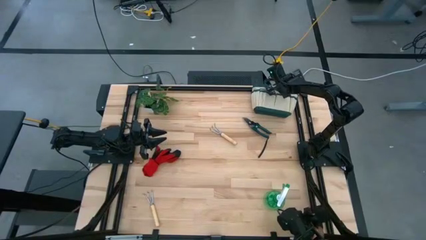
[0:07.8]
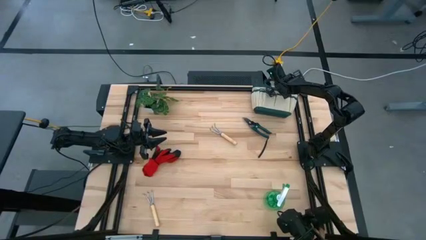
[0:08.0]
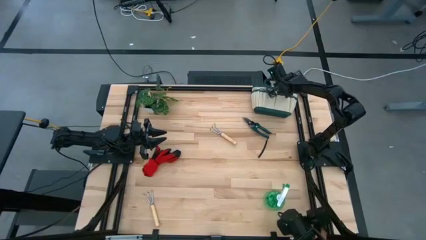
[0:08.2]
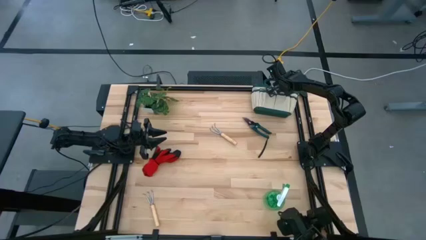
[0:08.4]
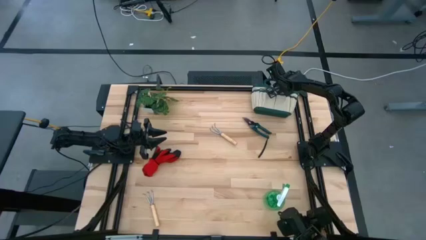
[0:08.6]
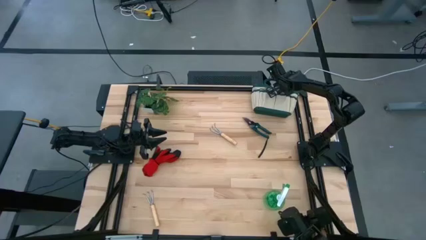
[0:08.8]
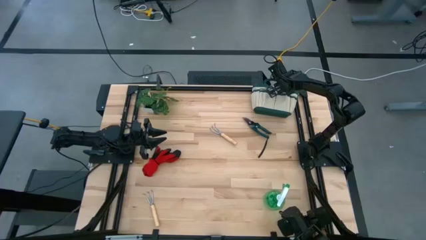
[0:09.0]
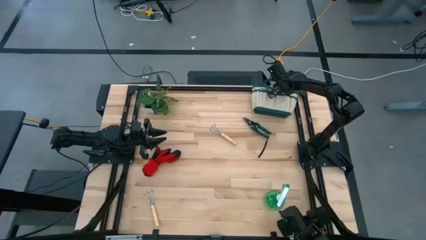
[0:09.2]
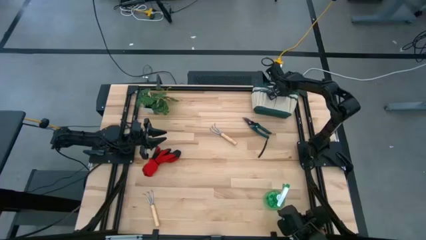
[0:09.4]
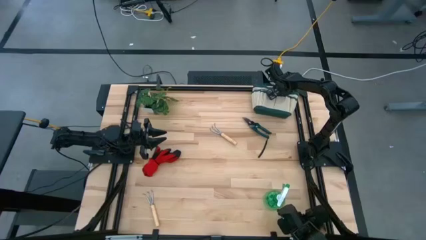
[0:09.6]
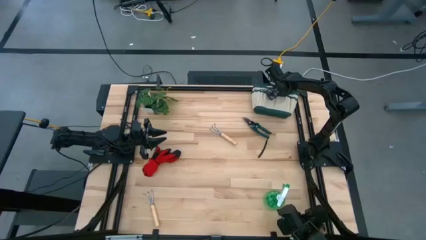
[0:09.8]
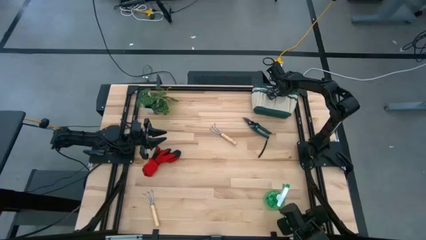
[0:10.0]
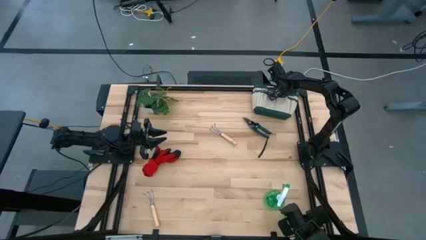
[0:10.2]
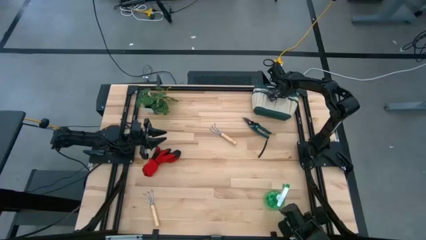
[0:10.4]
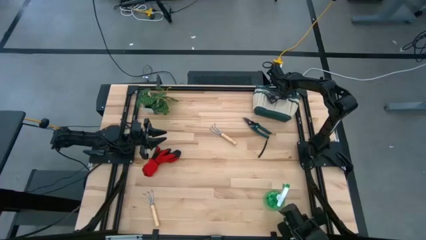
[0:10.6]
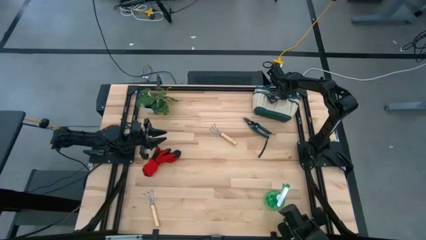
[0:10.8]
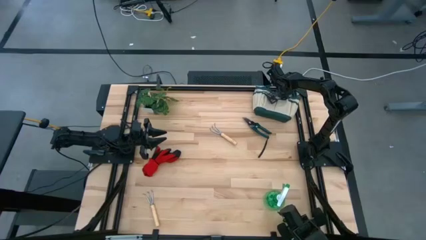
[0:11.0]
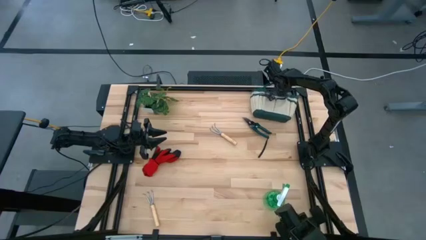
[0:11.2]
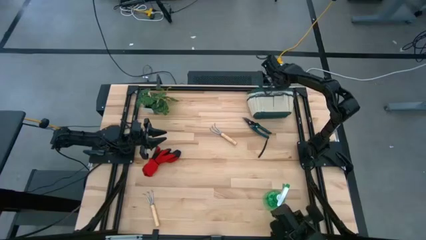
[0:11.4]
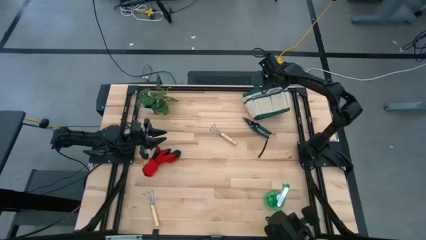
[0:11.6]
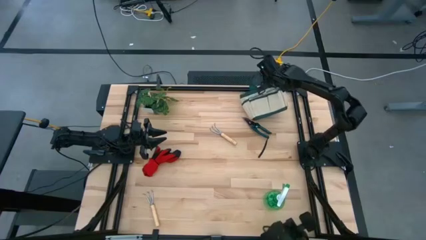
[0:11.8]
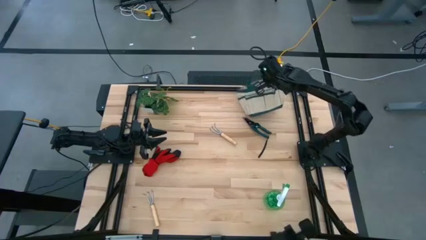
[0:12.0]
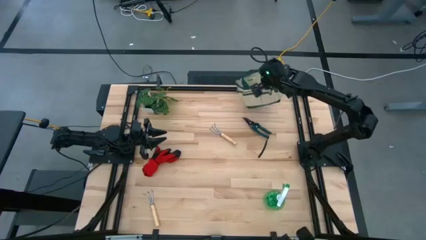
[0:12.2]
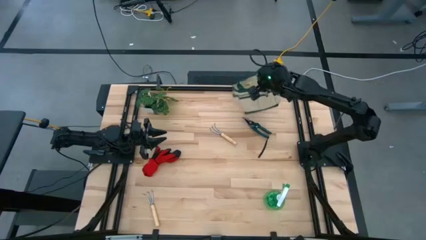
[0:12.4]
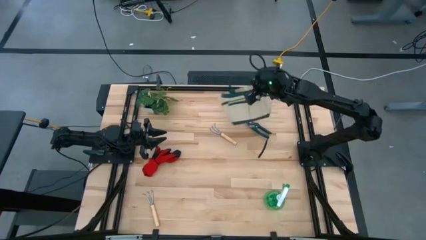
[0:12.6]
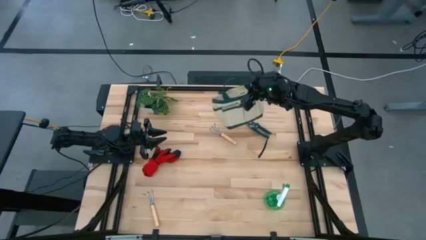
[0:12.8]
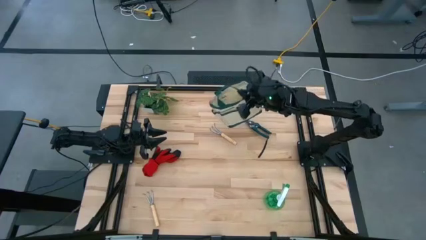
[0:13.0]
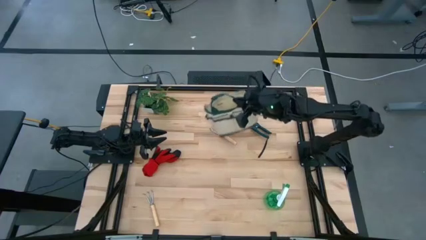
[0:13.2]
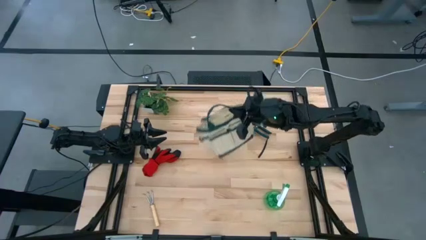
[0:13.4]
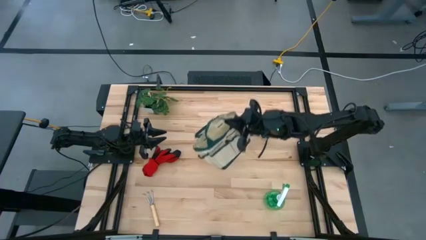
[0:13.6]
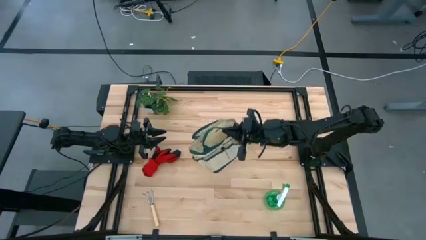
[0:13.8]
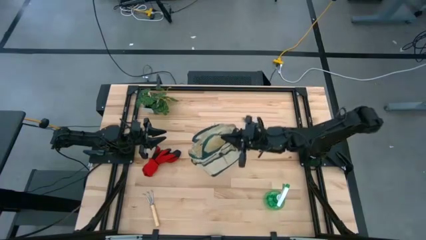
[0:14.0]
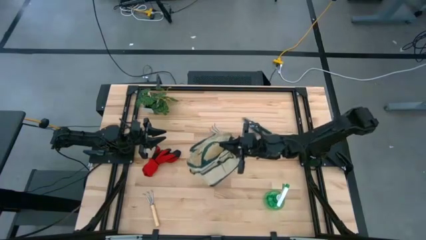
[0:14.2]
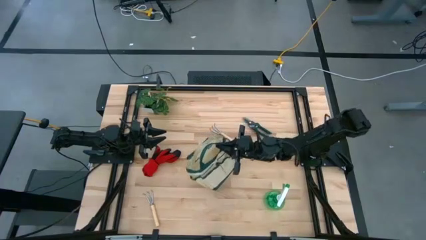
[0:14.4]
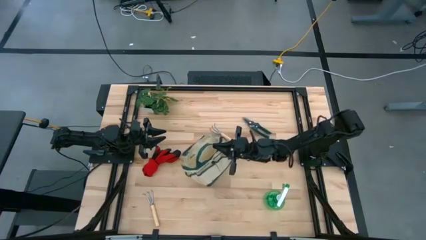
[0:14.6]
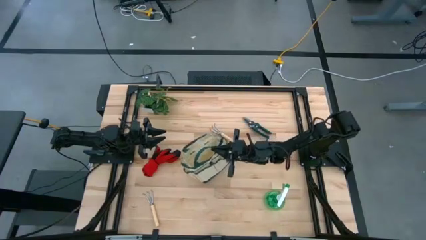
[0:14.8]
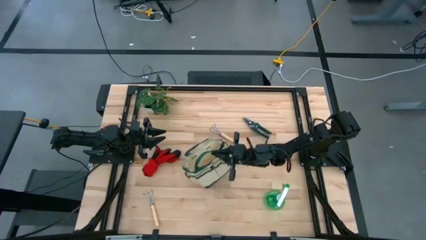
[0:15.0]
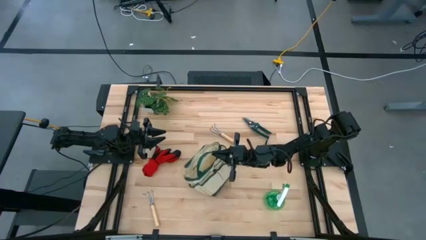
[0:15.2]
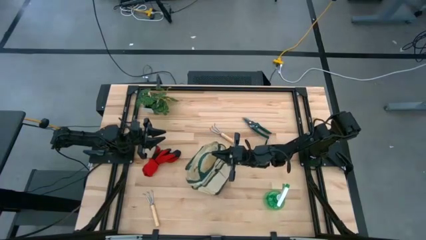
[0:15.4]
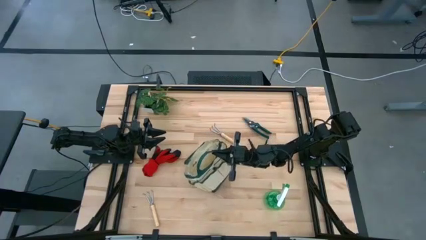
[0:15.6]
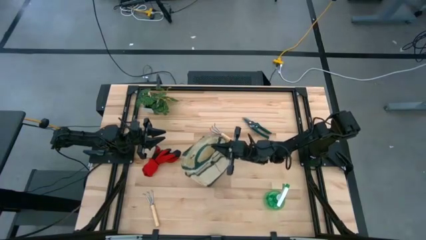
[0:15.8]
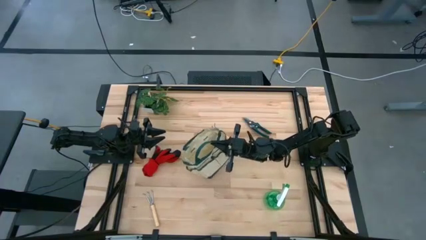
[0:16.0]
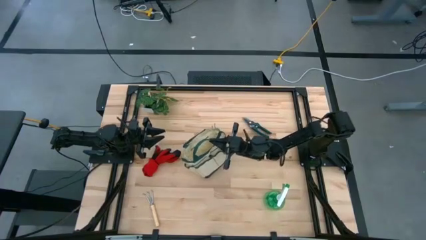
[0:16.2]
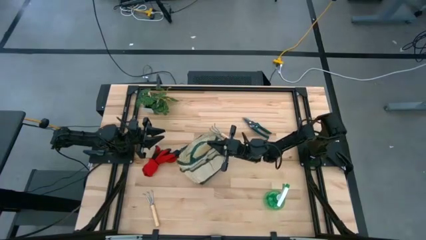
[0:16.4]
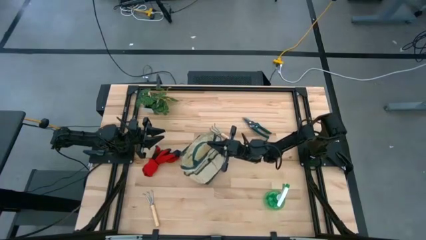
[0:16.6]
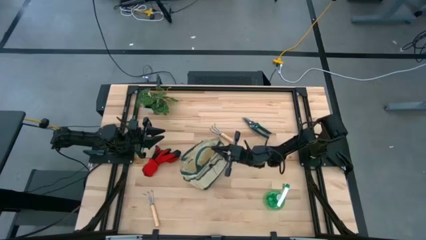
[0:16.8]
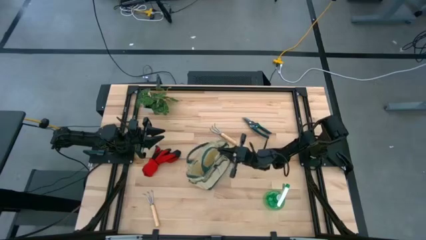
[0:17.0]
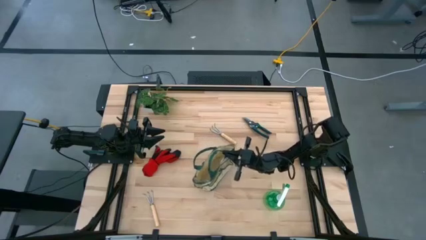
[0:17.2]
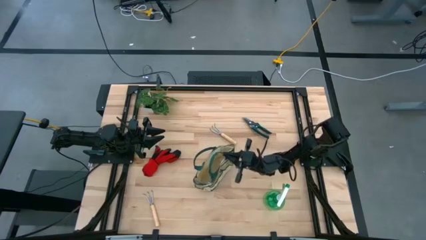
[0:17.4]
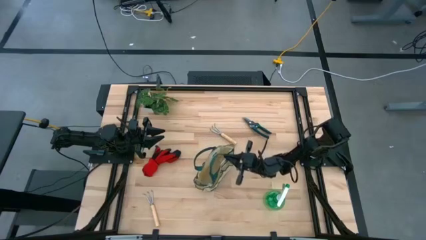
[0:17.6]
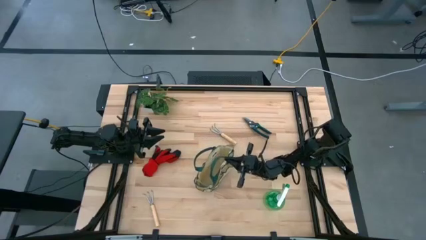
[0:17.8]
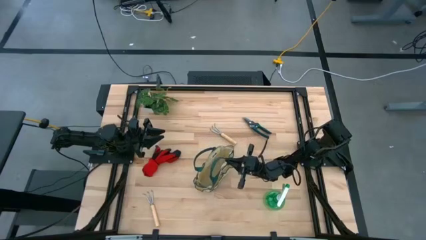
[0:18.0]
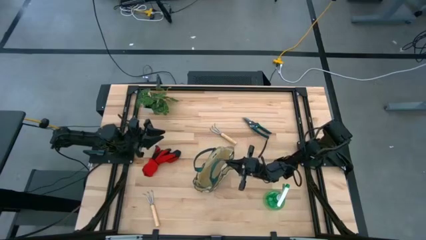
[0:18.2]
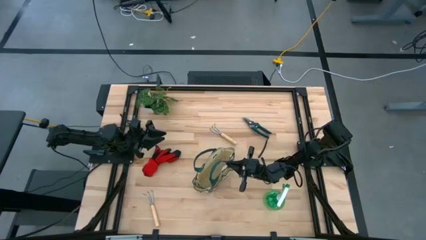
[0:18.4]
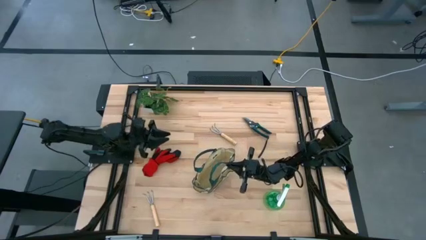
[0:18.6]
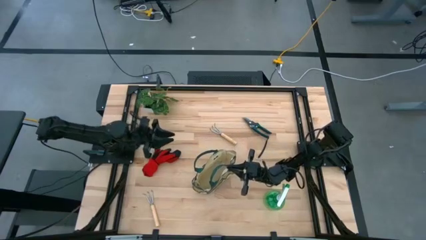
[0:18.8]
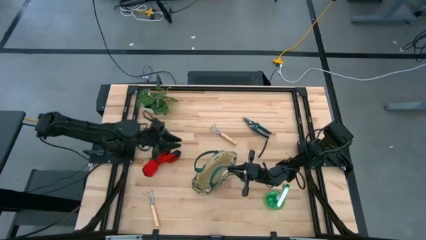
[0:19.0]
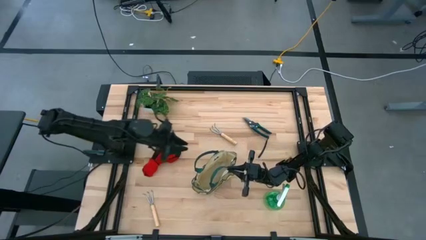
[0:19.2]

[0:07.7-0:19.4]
Task: Pick & Place Garden tools in Gardening bag
Prepare the green gardening bag

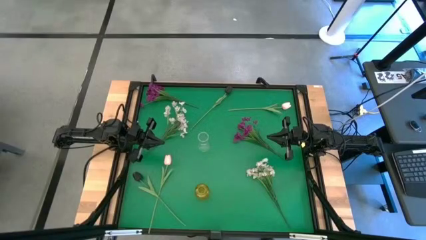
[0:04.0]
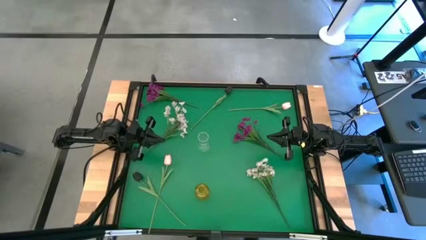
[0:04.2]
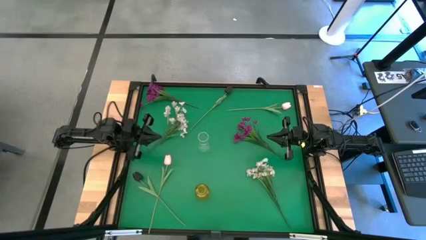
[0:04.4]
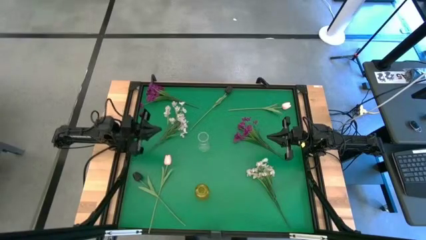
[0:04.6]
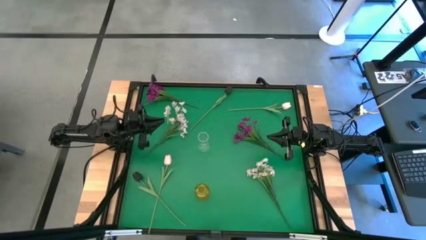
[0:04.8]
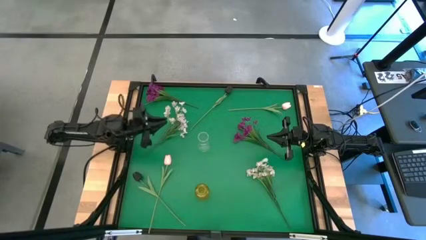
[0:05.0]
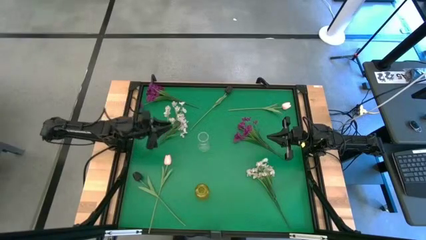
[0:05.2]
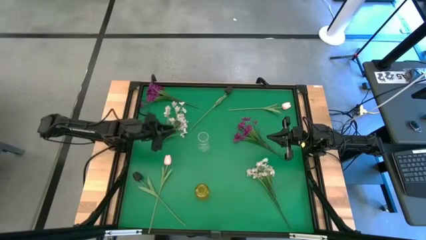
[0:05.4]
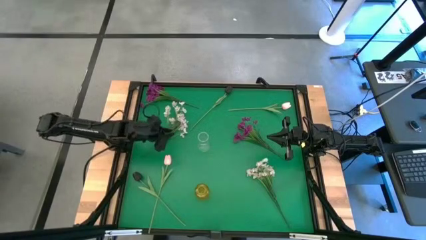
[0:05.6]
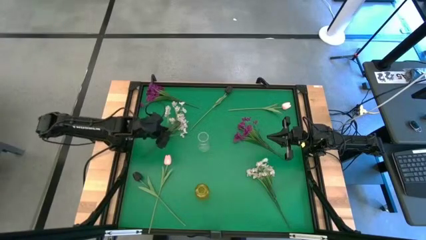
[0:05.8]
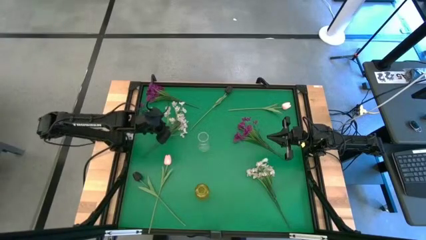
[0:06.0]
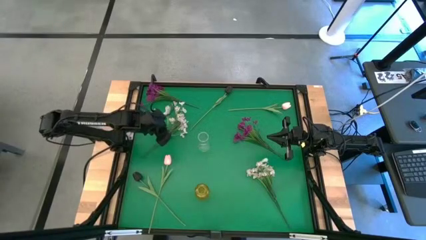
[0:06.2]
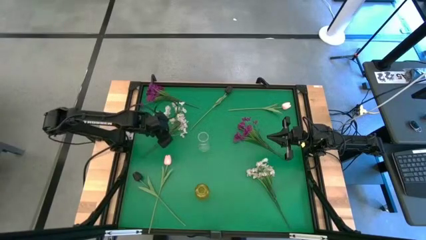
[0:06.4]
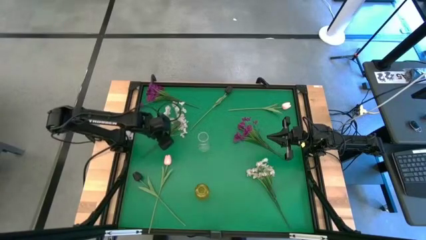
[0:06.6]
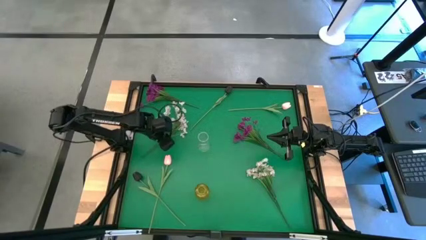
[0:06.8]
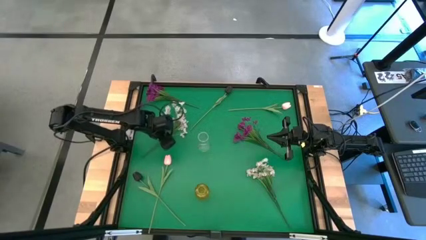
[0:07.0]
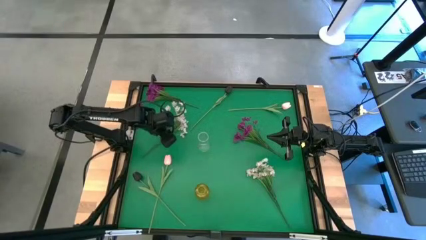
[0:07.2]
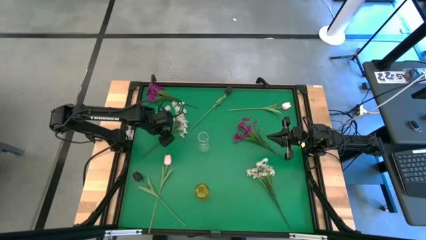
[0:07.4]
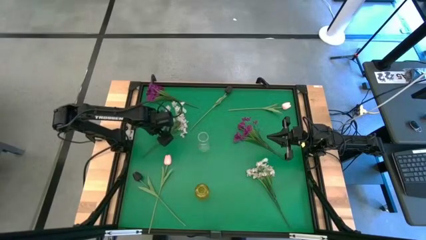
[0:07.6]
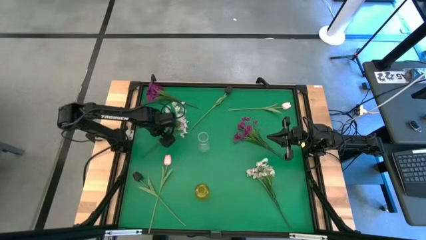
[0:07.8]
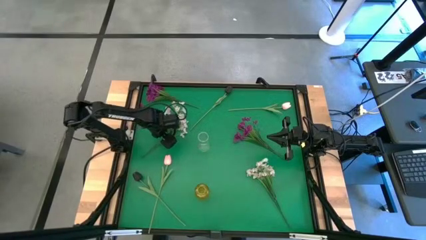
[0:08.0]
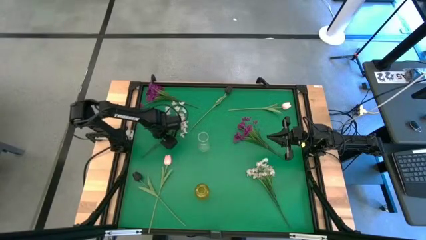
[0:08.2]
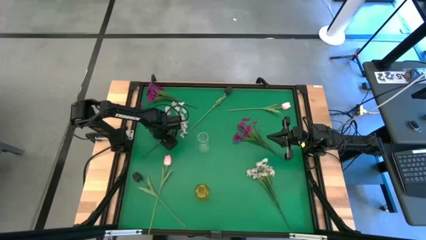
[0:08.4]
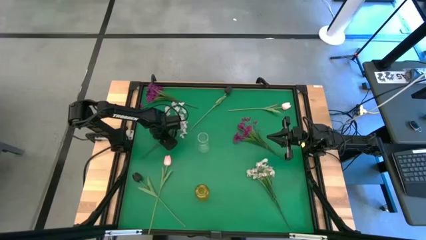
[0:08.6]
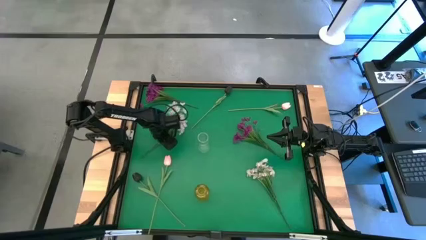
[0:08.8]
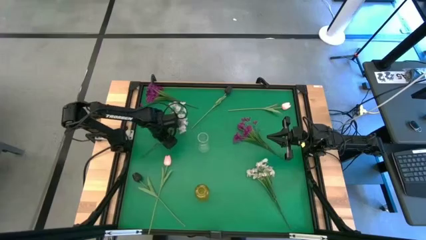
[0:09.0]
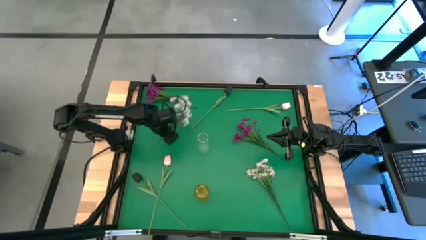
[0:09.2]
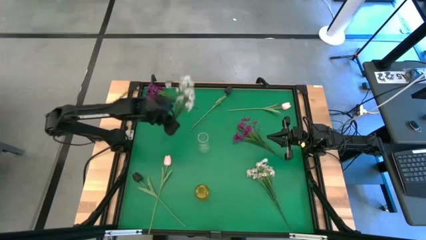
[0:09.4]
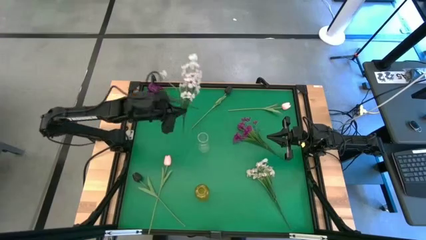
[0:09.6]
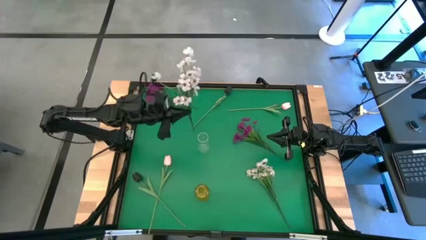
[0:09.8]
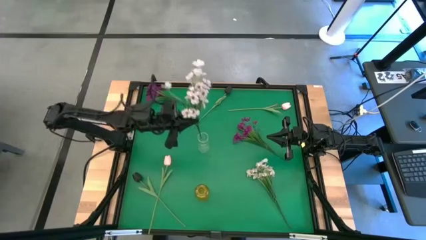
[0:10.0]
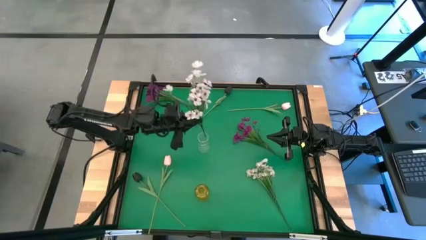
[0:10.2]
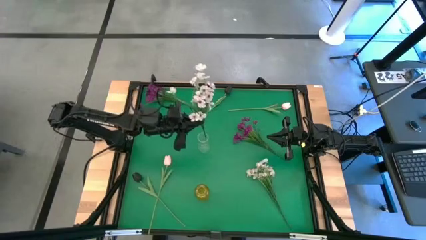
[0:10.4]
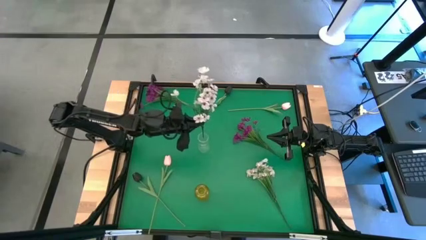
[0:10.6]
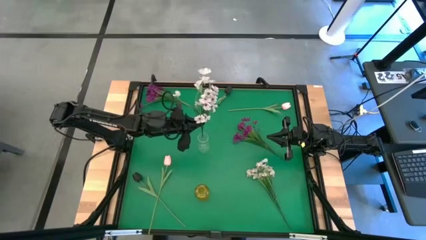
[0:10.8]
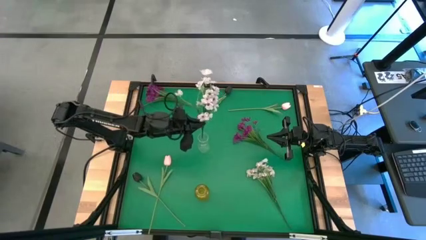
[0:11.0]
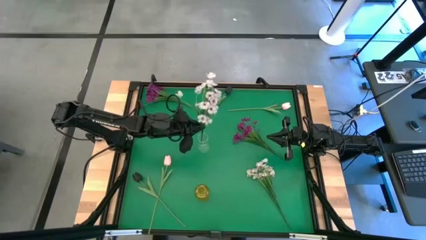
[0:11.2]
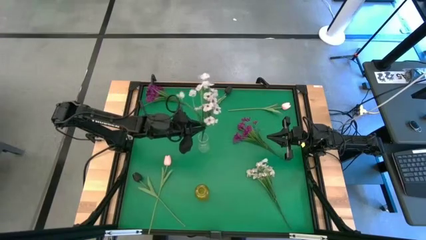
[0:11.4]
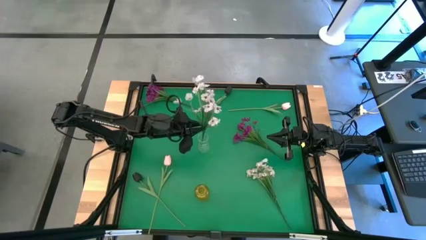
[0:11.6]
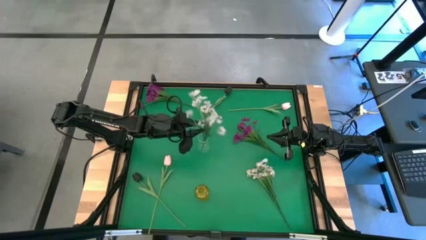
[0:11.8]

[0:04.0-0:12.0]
Task: Sort flowers into vase by color
Put the left white flower into the transparent vase
